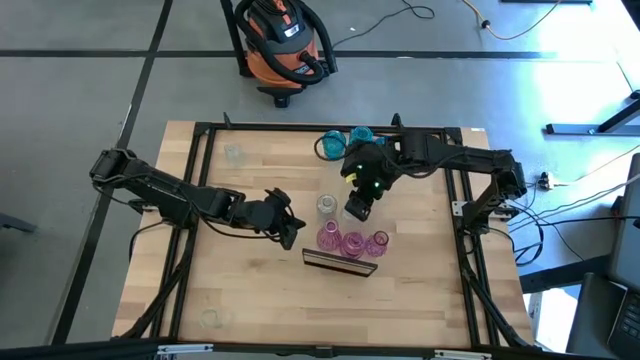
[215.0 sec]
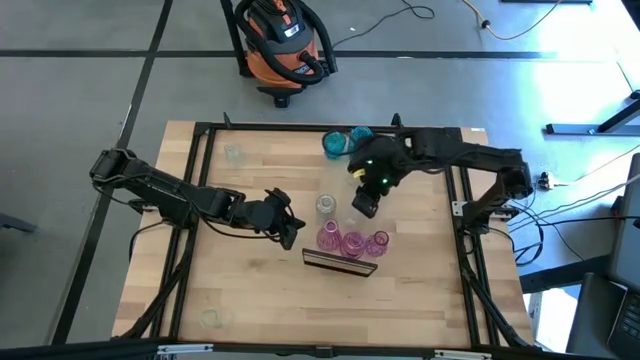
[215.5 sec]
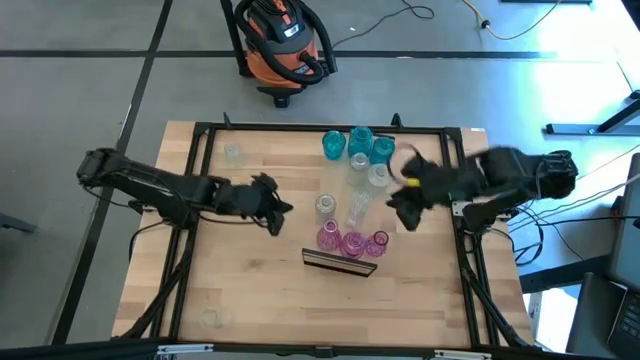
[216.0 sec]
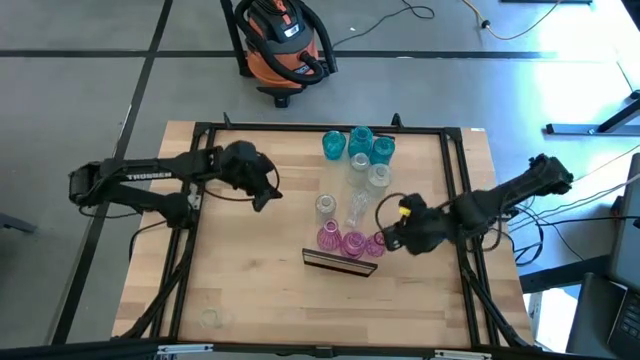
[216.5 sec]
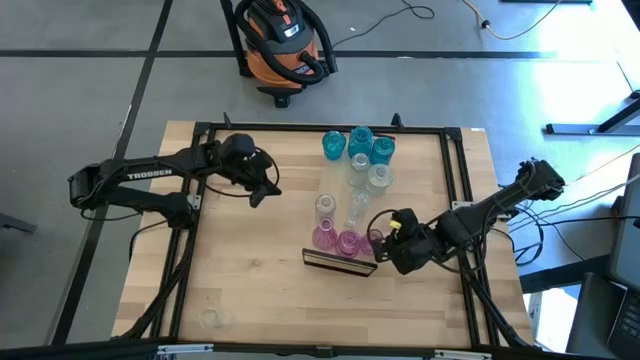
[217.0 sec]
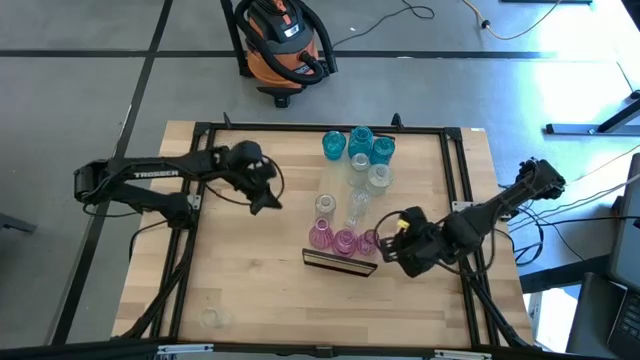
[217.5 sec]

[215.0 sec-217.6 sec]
Task: sort vases onto shelf
Adjust the pink vase on the shelf

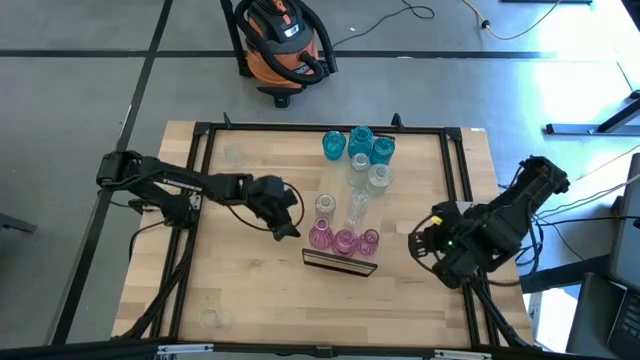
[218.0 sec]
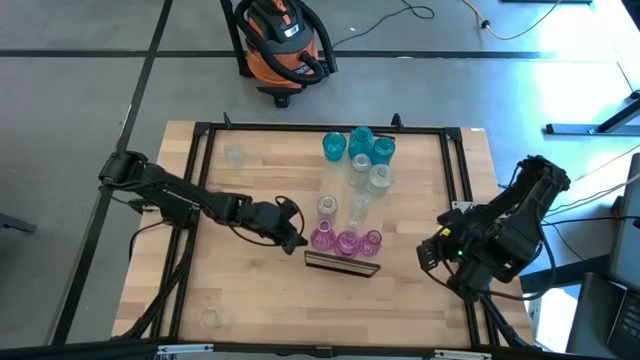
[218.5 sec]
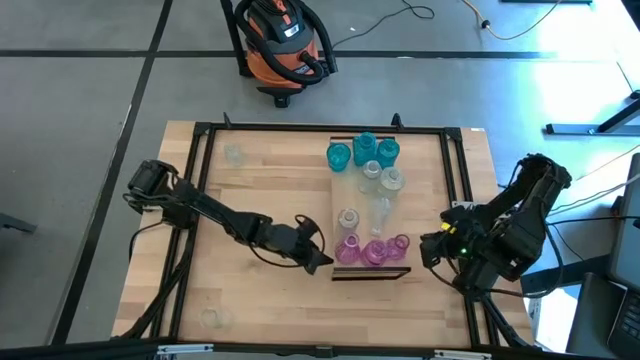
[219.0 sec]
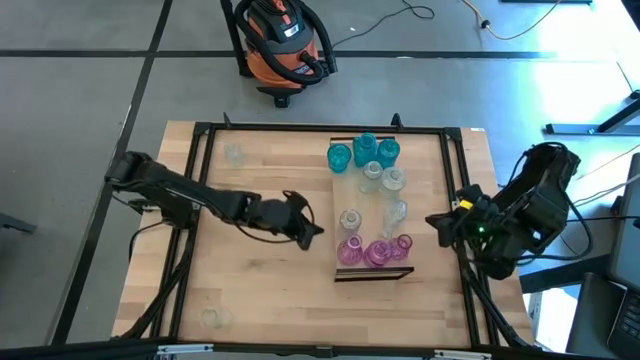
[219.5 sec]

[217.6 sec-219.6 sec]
Adjust the shelf

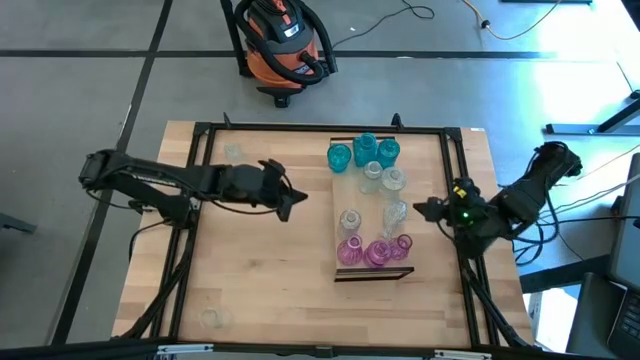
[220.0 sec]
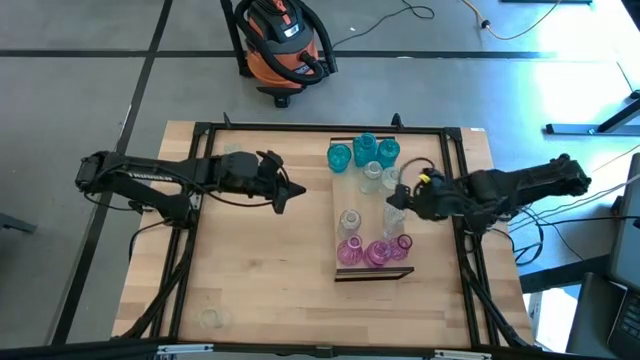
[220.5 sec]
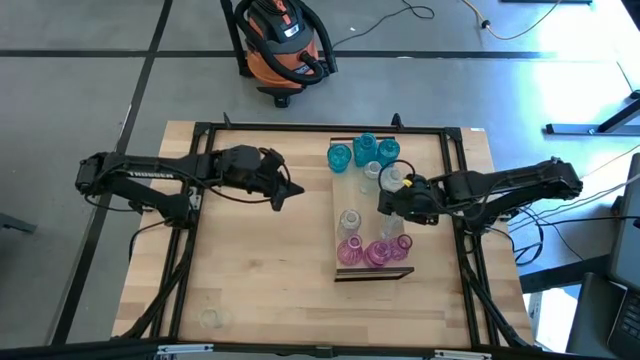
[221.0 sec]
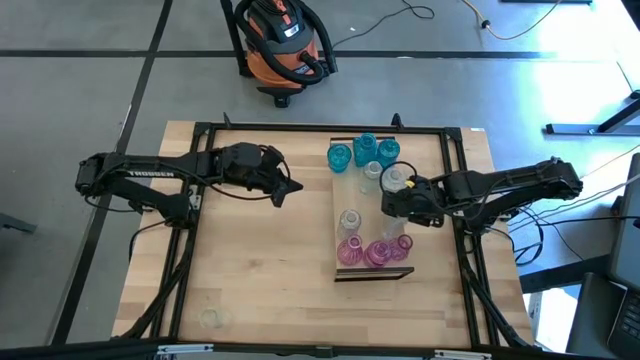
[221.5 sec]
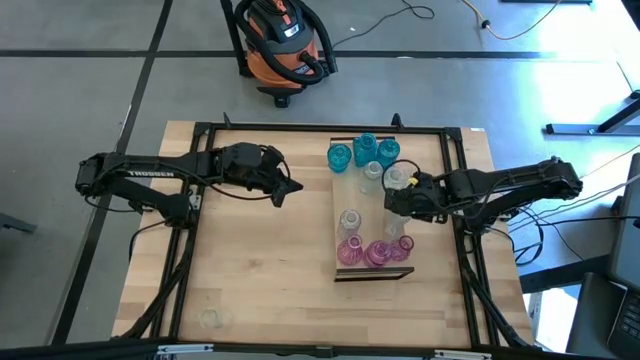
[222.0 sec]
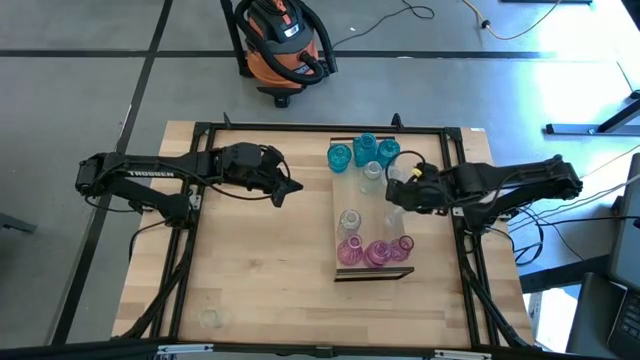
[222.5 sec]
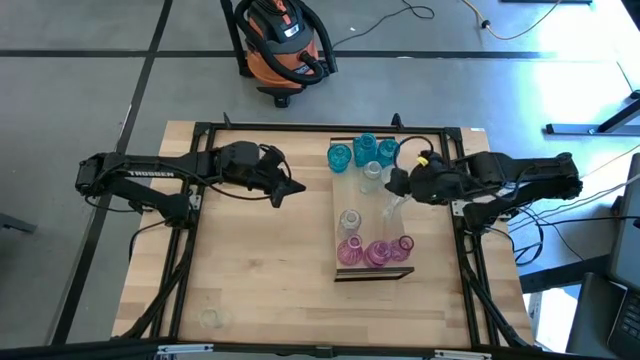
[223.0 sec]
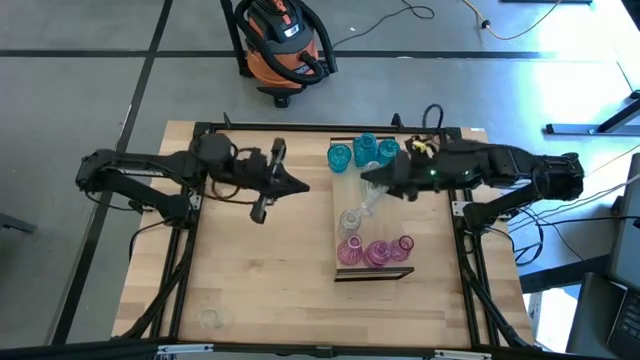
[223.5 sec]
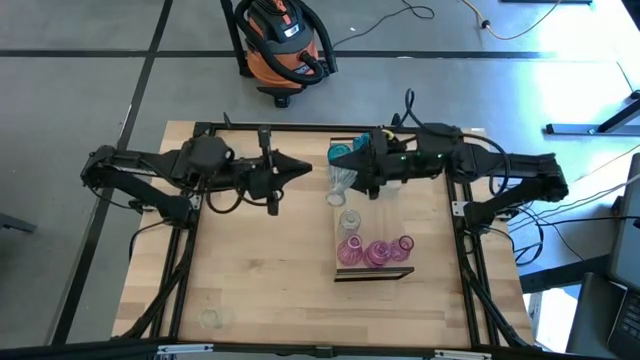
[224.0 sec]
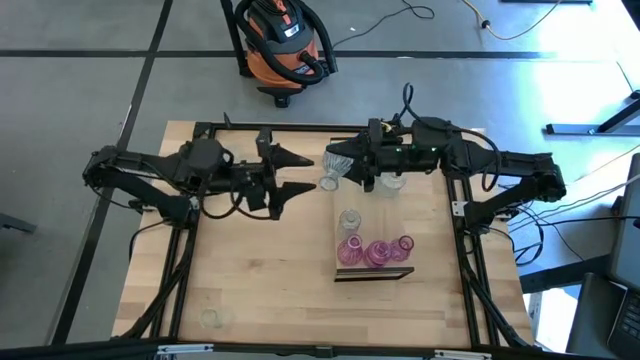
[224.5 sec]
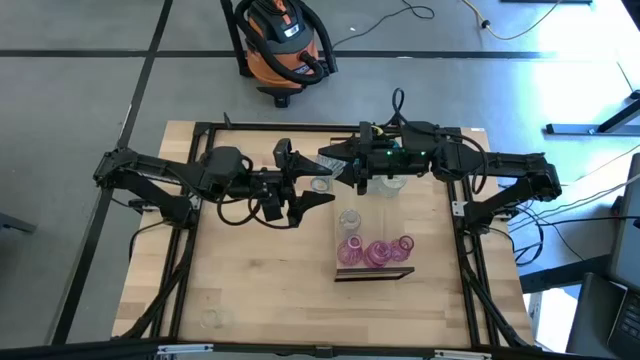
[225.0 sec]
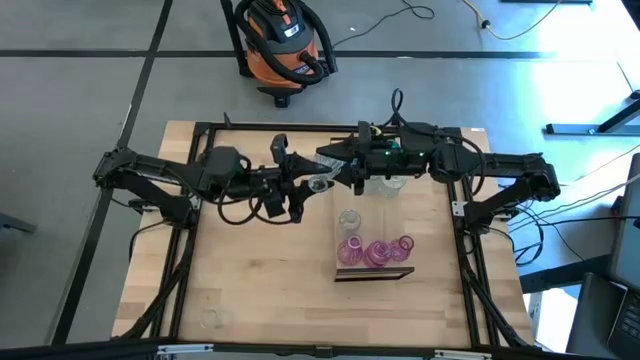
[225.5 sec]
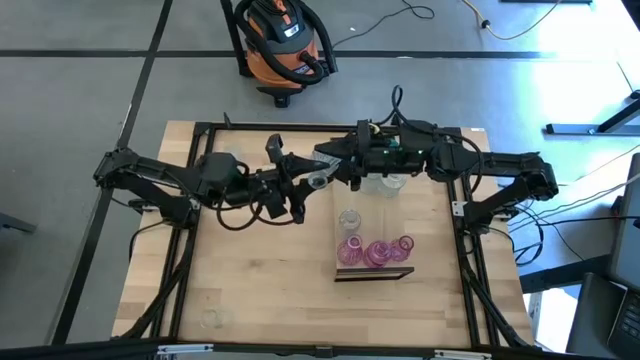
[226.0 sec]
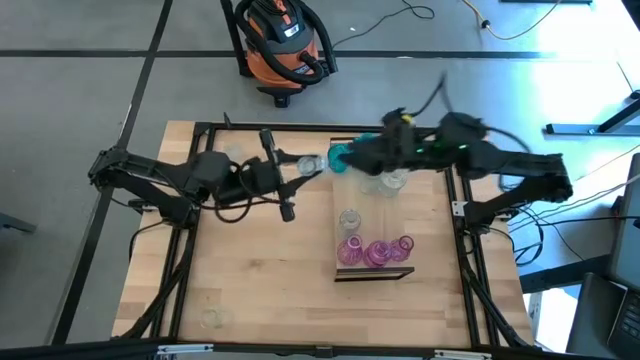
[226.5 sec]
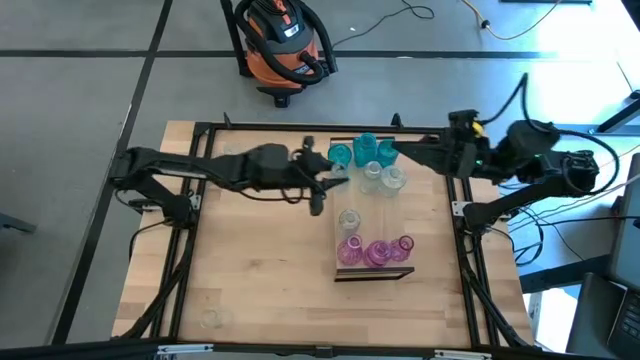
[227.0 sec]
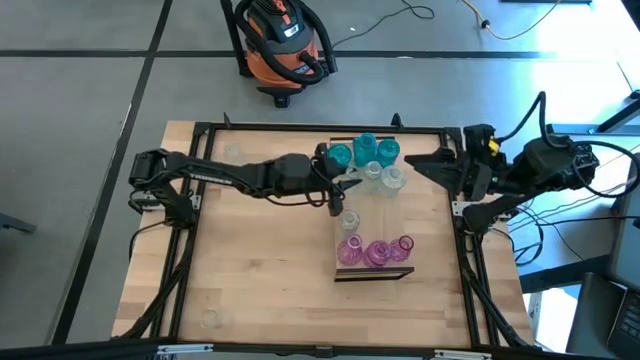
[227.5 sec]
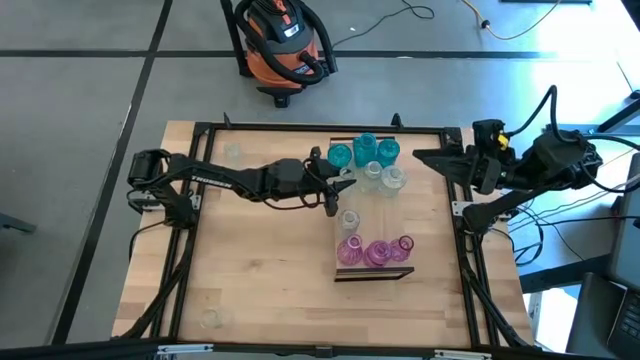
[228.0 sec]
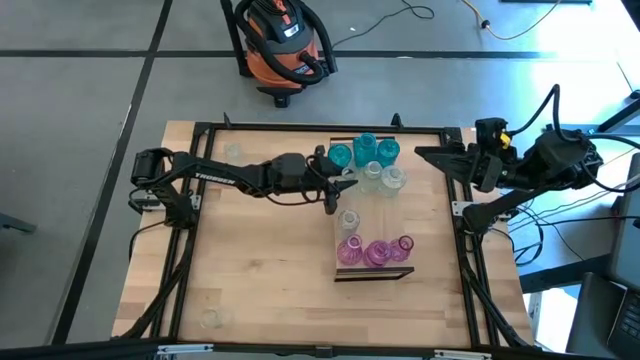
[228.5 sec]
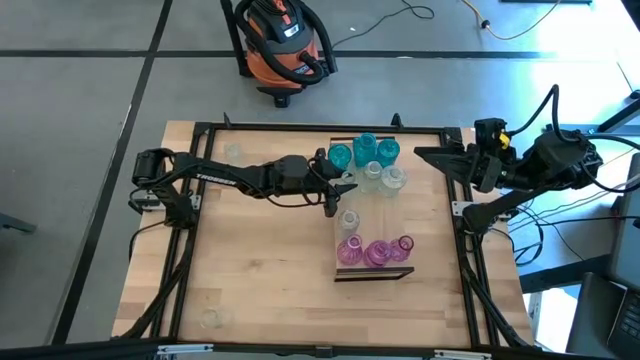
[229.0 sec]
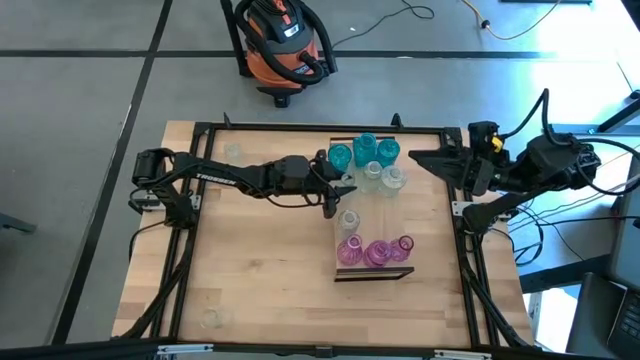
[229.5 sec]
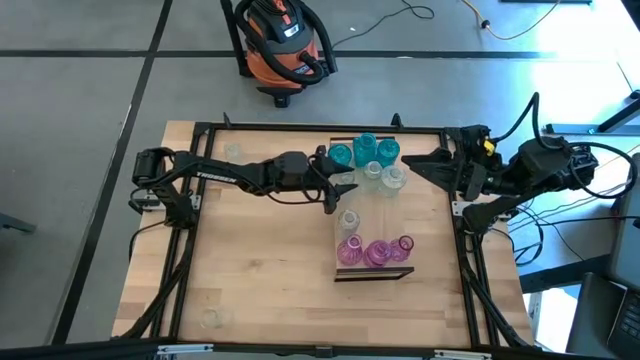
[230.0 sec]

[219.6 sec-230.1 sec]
Adjust the transparent vase on the shelf

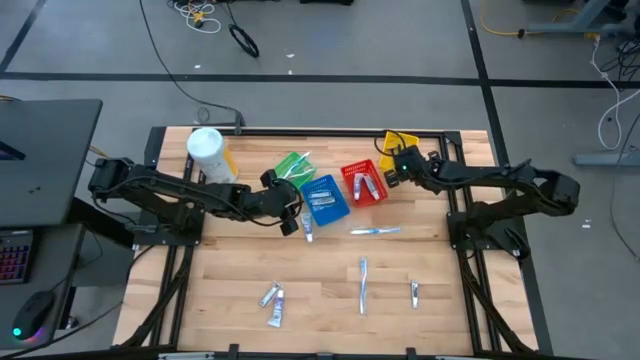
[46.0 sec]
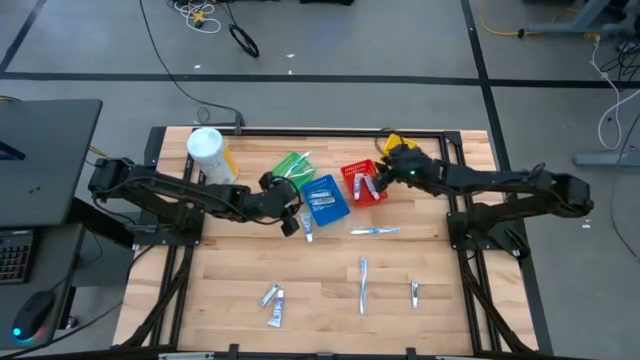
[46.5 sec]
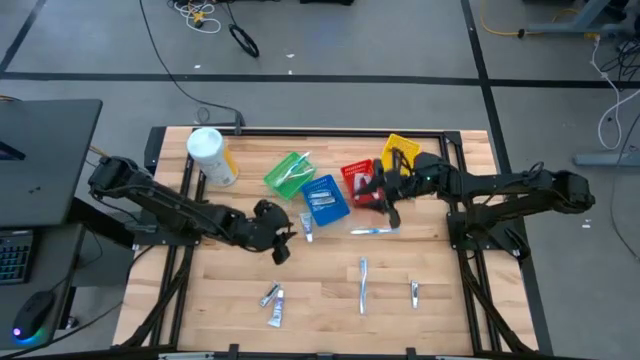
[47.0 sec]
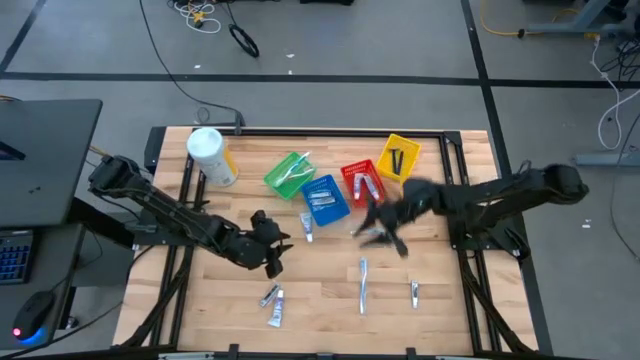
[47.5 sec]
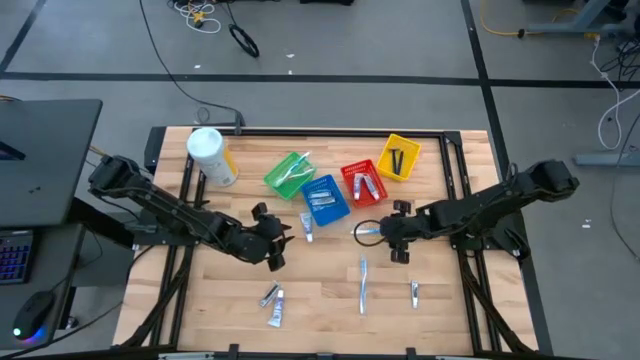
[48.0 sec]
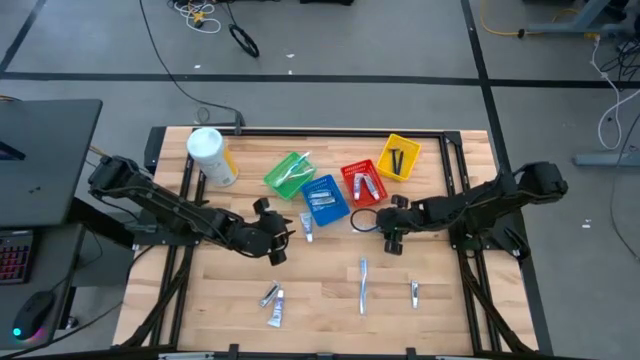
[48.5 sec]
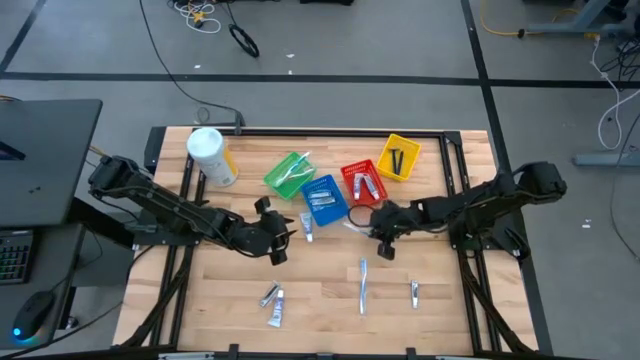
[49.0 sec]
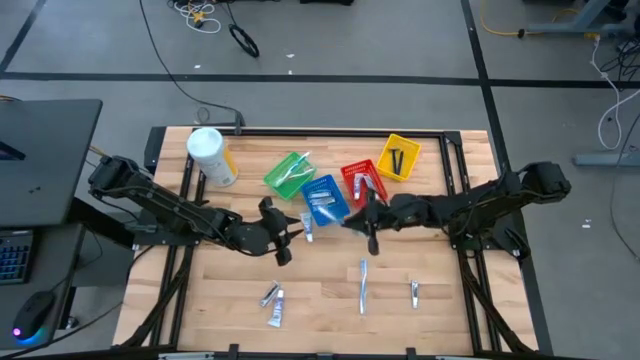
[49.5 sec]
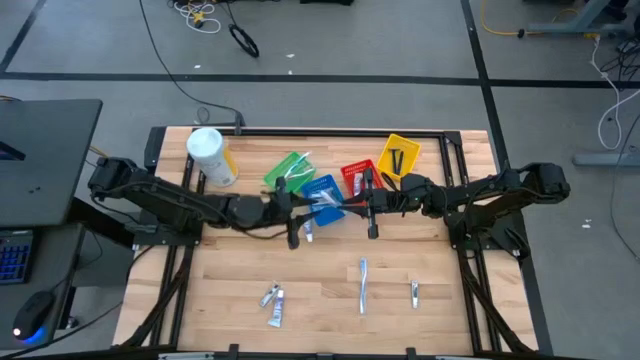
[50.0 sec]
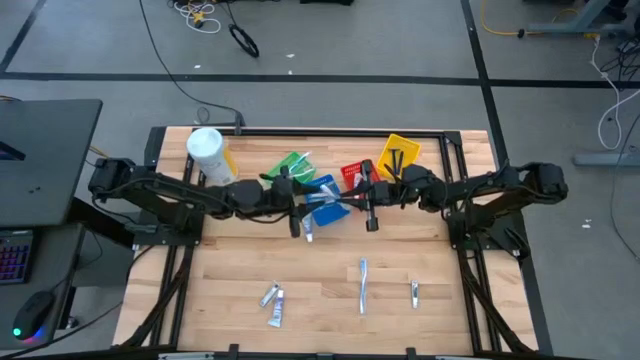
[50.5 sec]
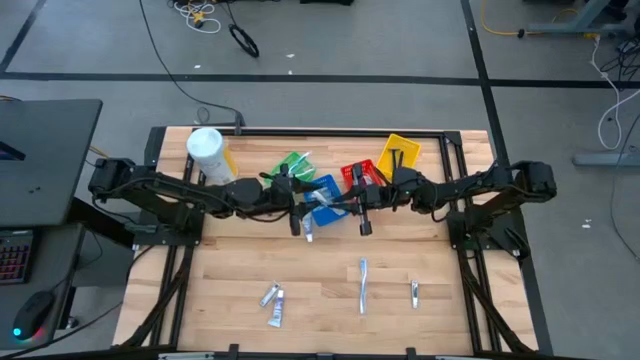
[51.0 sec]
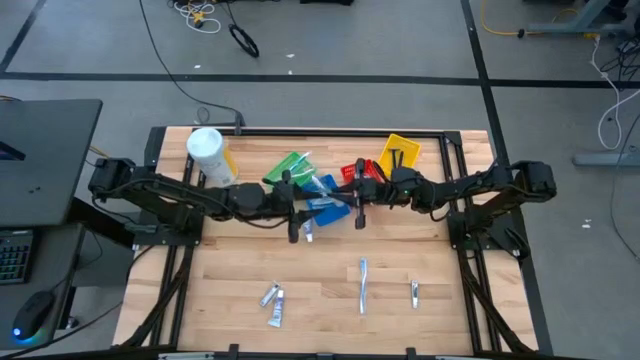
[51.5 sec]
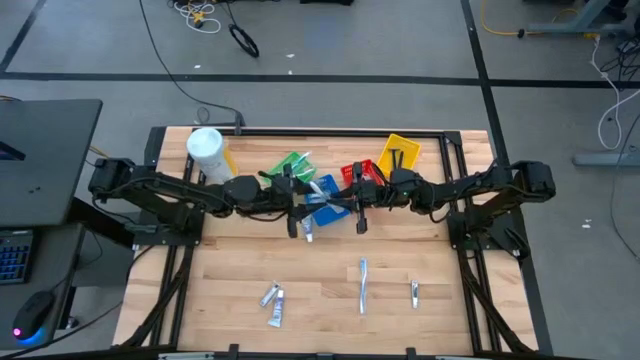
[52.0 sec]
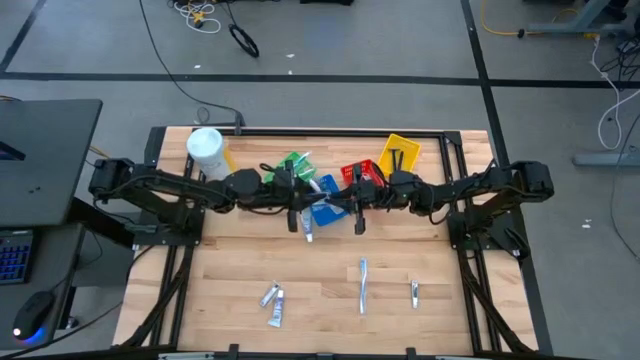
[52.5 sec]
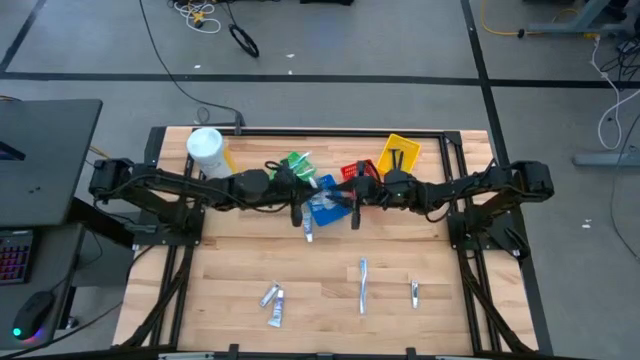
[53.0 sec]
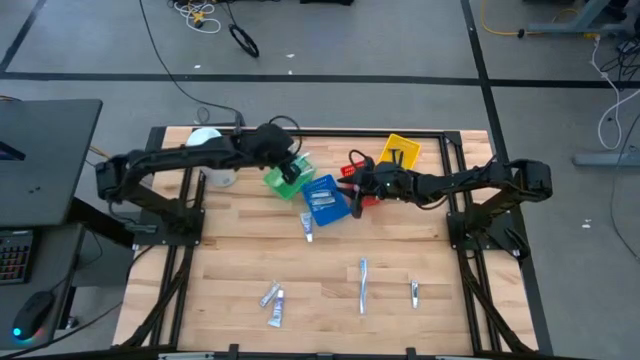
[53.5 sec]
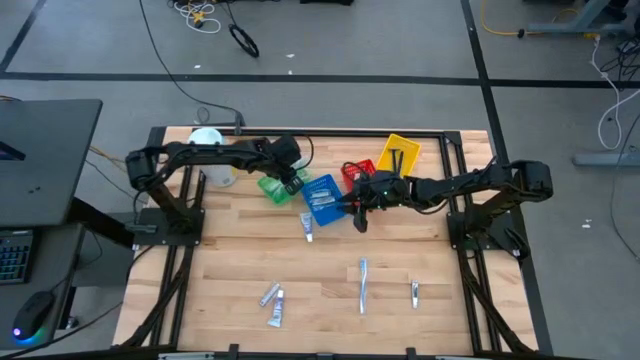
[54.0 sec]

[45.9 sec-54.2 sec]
Task: Pick & Place Travel size toiletries
Put the top blue toothbrush into the green bin
